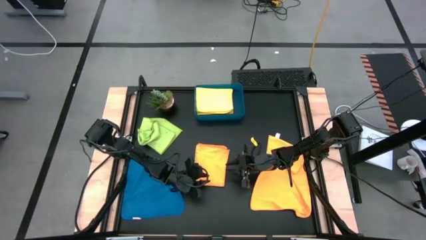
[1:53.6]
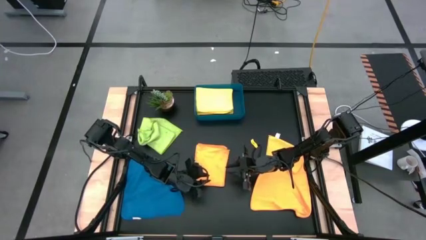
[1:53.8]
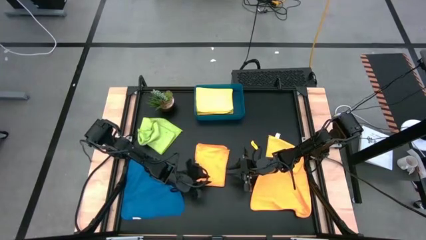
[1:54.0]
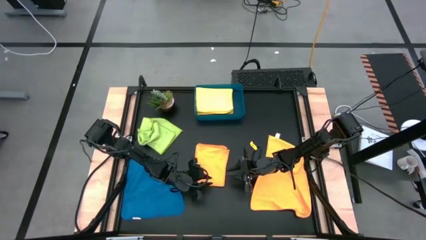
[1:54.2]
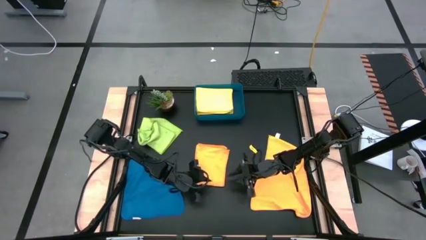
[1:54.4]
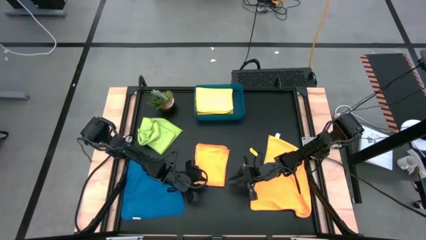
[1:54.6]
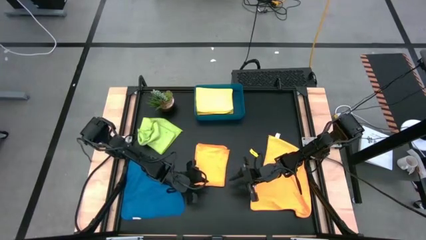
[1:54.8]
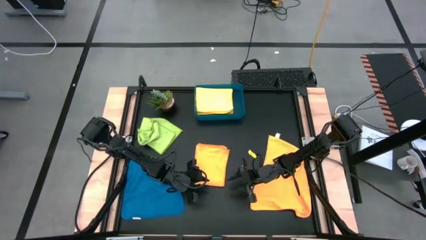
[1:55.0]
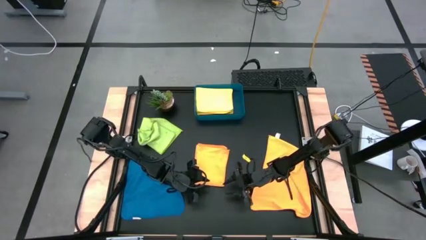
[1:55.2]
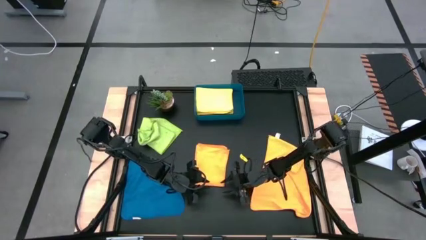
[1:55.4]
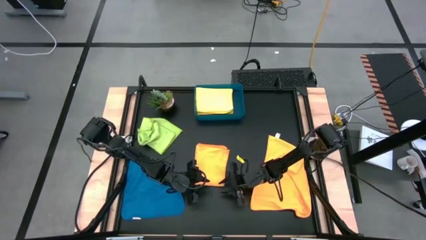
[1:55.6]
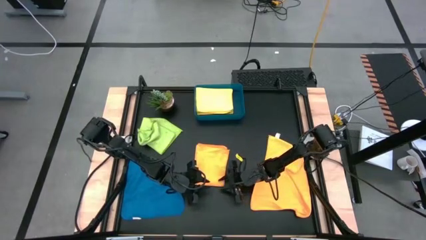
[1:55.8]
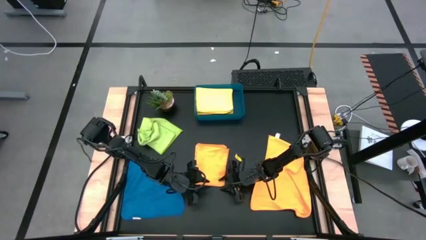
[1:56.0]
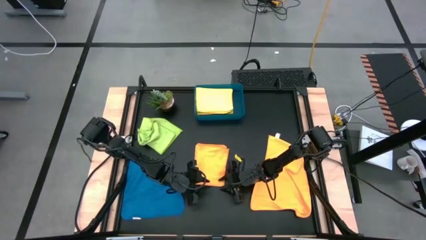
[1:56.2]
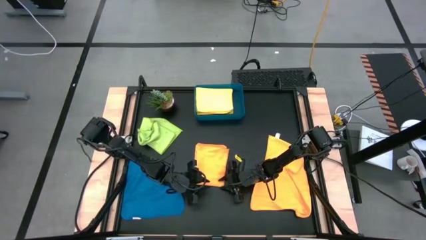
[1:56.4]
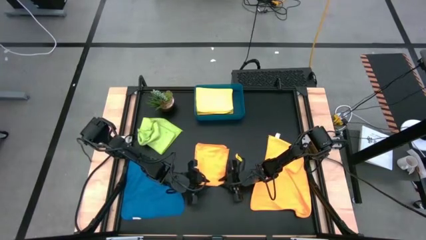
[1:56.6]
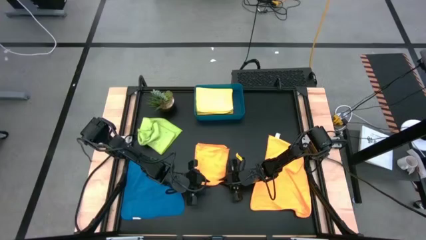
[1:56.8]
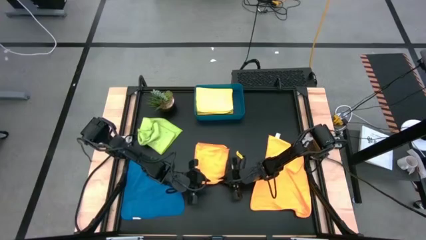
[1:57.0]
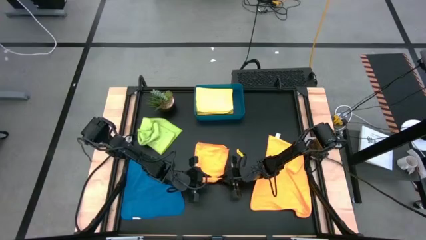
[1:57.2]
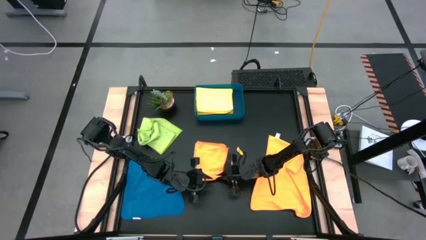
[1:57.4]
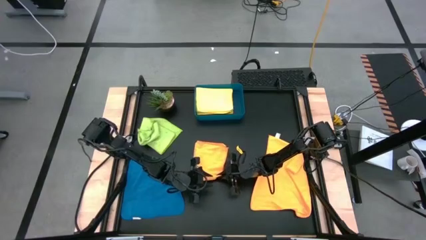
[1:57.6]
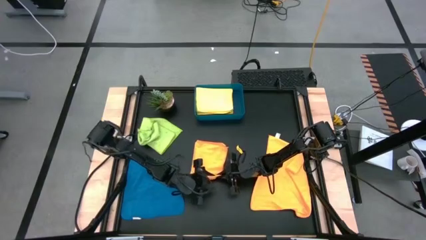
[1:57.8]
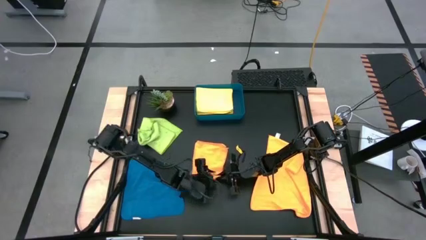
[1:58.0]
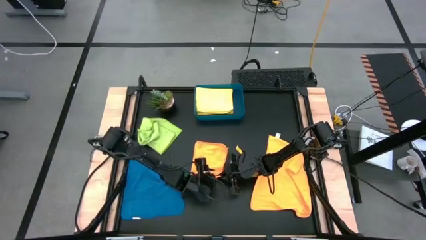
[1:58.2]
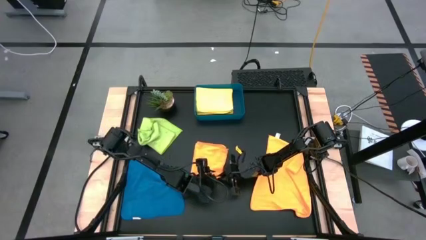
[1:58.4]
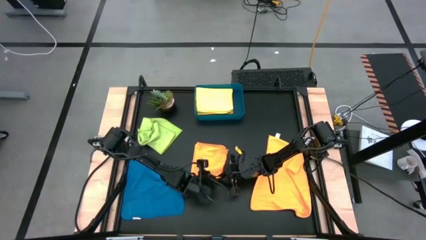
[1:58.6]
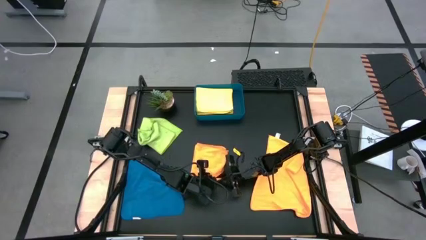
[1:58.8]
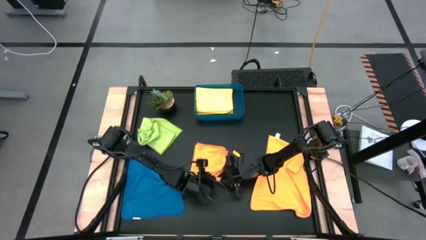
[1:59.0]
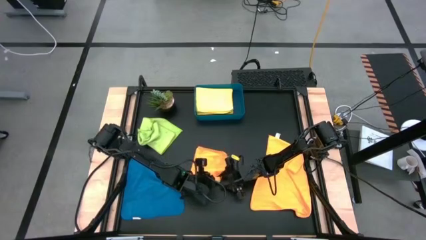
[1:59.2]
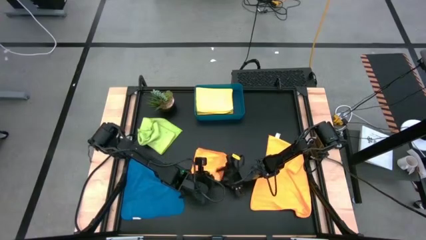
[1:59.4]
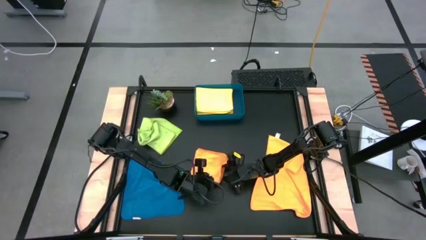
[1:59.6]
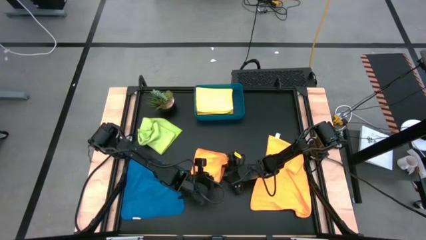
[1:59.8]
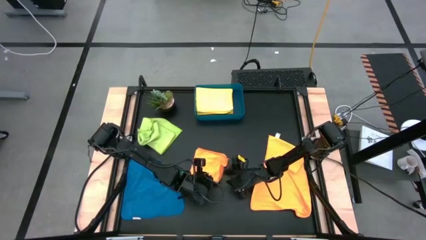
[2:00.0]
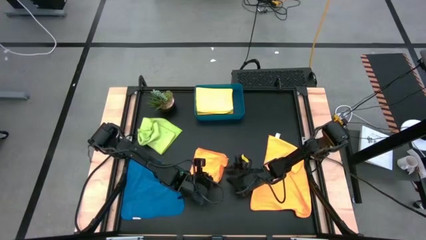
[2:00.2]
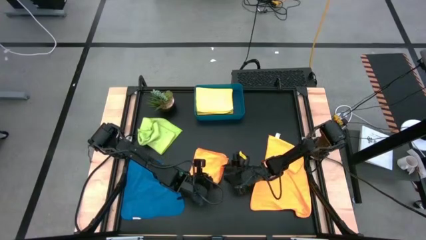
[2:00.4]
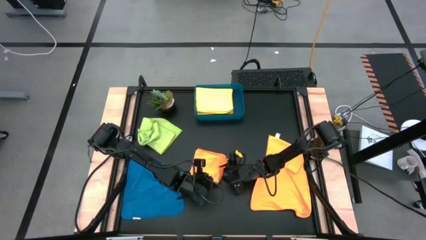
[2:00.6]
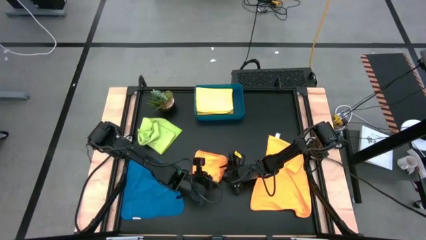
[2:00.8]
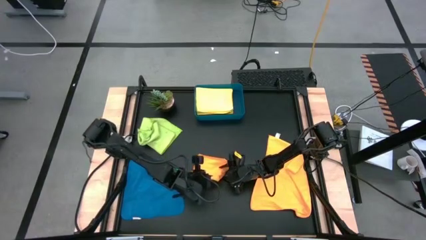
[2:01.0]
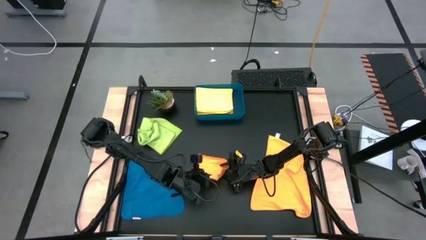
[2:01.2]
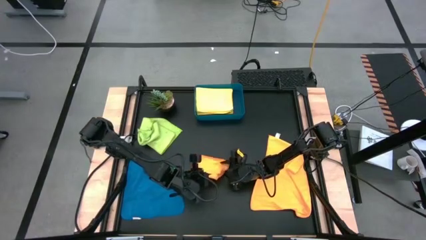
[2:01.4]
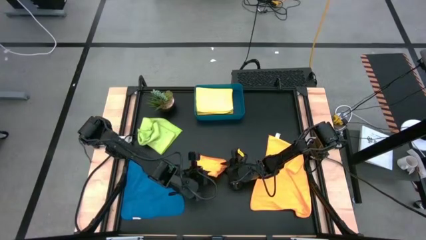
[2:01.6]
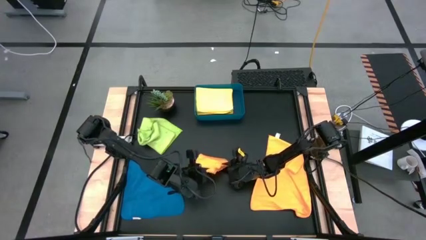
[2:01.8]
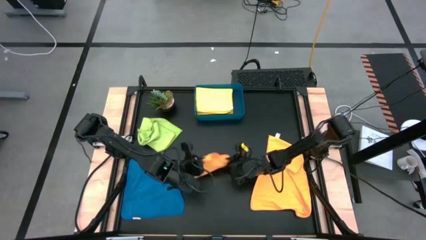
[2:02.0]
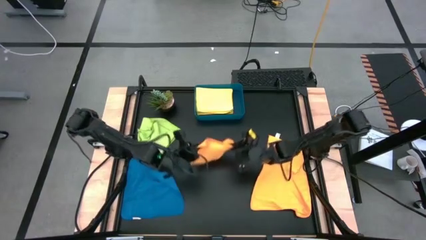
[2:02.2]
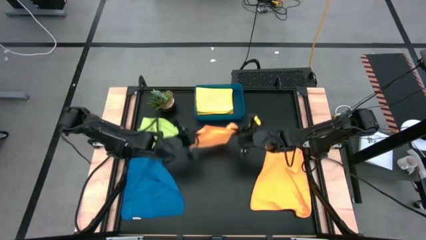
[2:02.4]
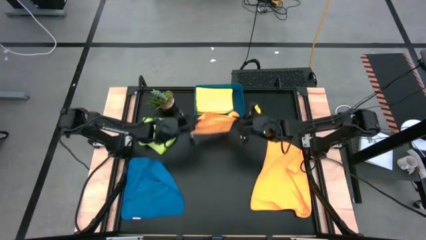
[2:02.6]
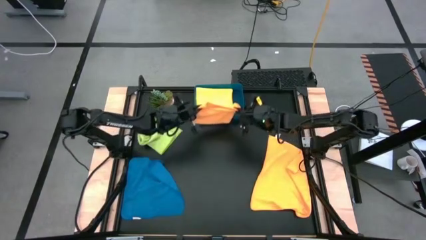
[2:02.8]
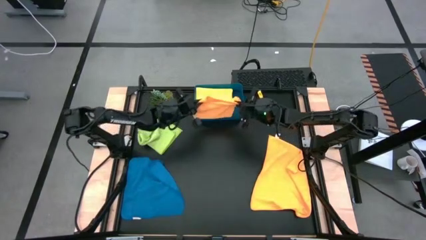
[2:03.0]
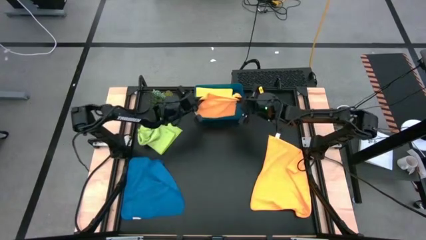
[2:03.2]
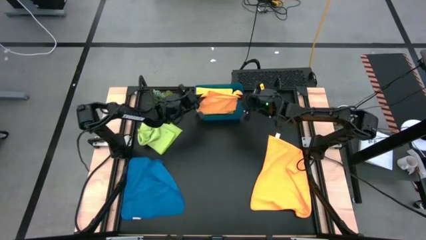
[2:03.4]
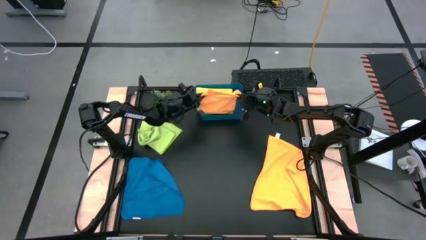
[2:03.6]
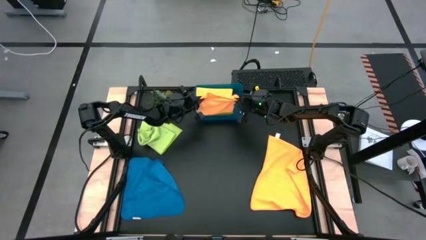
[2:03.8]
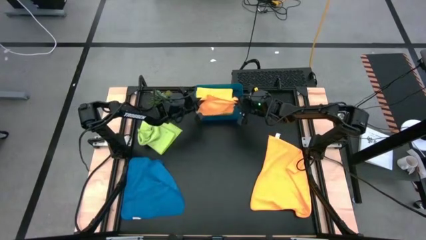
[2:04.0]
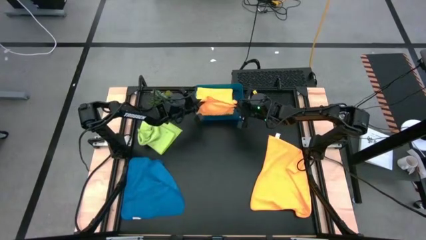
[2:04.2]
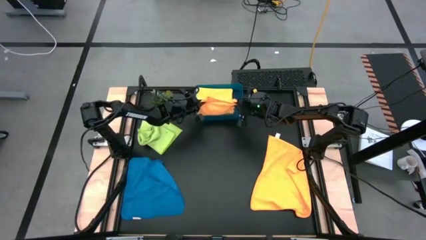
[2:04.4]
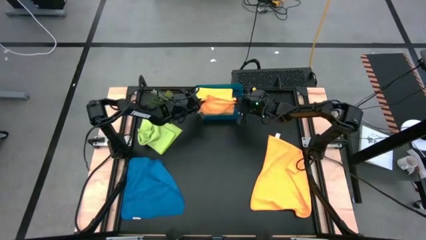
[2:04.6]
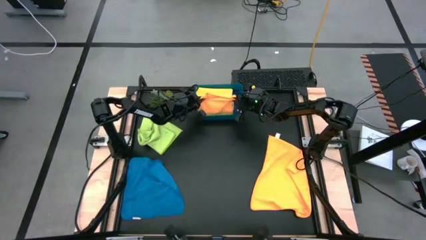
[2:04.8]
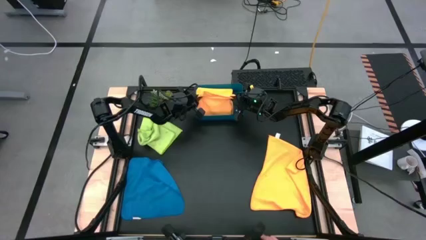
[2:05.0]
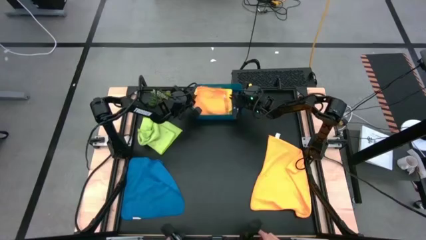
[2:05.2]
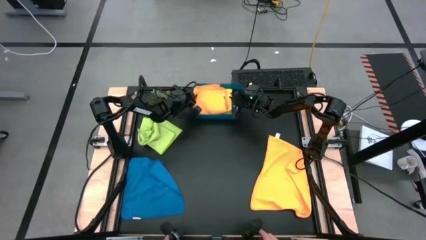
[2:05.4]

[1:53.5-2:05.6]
Task: Fold microfiber towels
Put the folded orange microfiber cloth into the blue bin

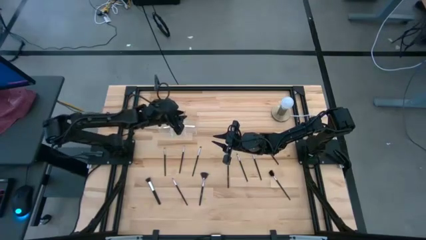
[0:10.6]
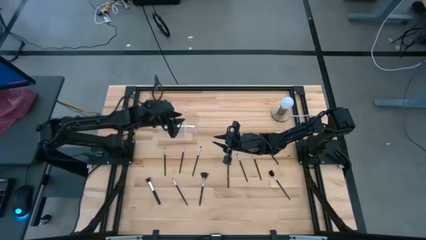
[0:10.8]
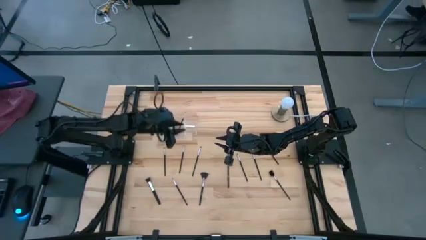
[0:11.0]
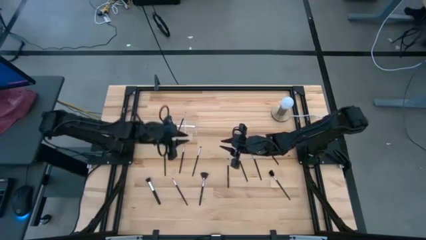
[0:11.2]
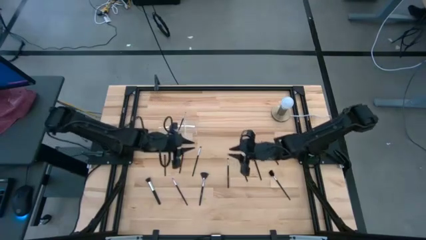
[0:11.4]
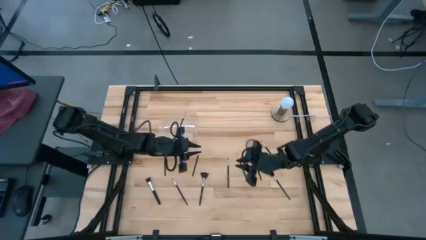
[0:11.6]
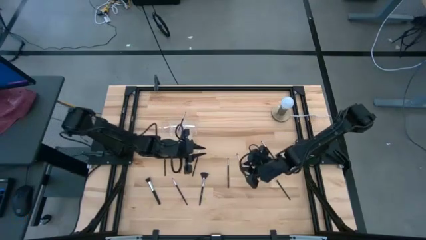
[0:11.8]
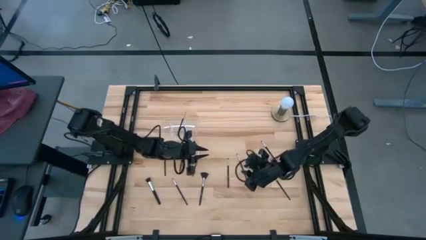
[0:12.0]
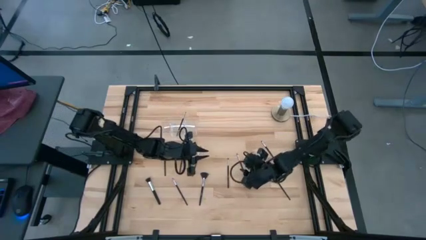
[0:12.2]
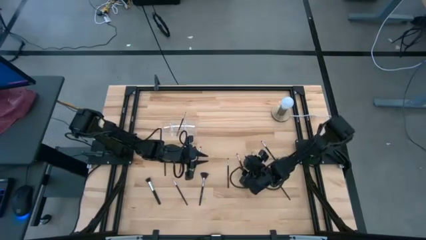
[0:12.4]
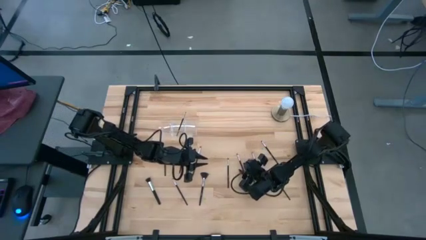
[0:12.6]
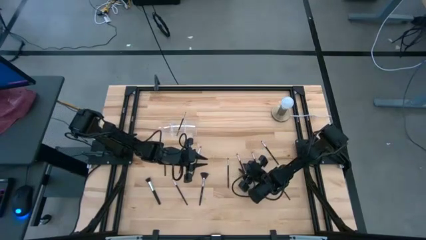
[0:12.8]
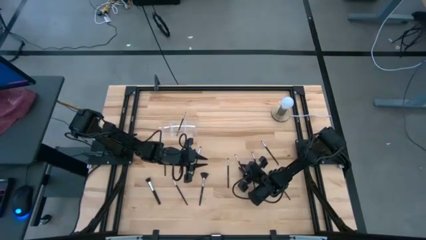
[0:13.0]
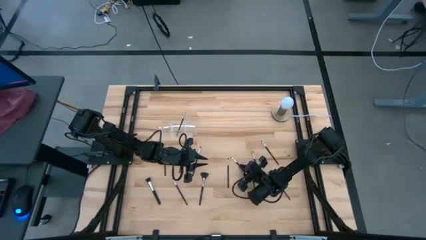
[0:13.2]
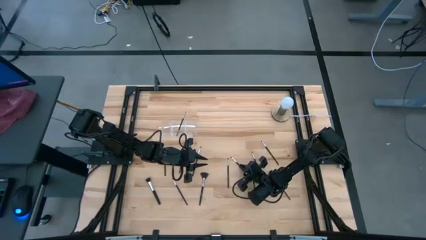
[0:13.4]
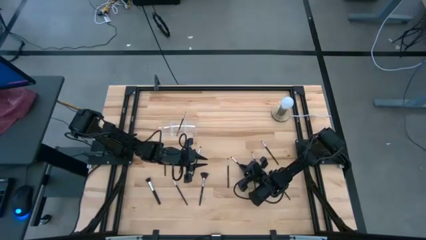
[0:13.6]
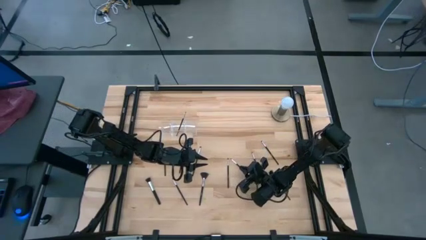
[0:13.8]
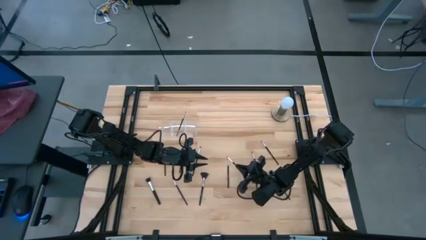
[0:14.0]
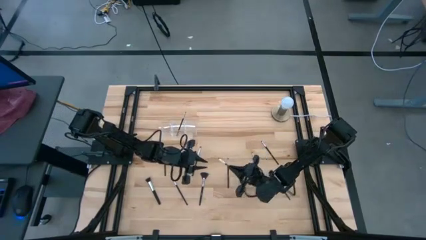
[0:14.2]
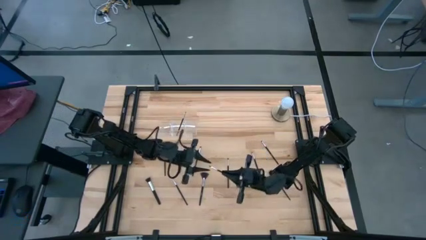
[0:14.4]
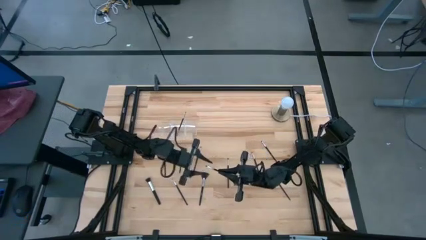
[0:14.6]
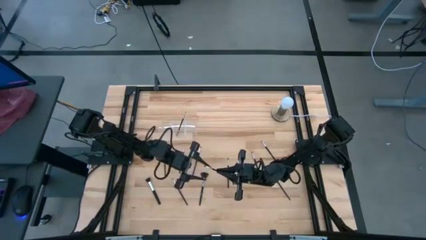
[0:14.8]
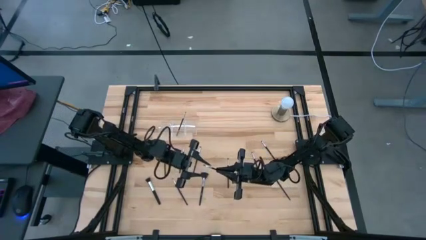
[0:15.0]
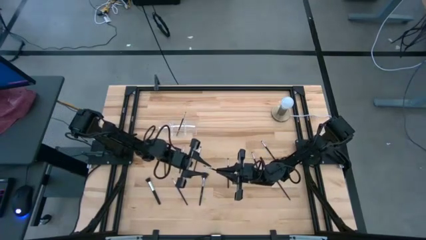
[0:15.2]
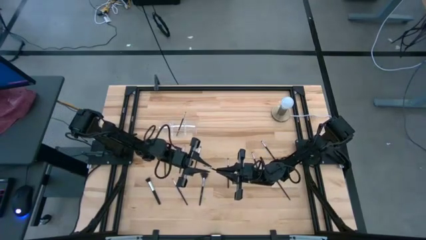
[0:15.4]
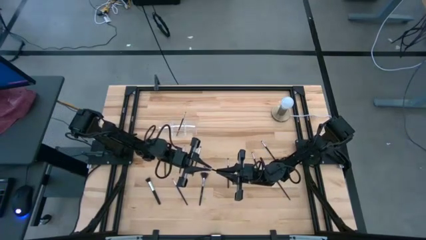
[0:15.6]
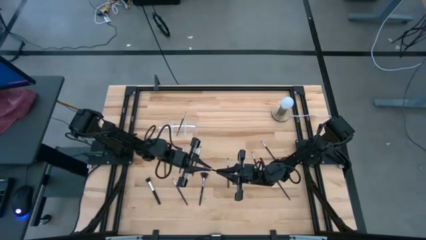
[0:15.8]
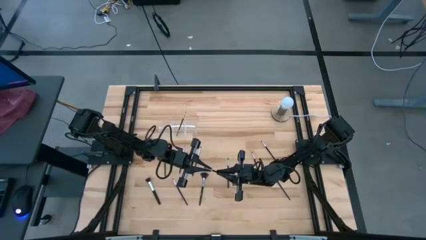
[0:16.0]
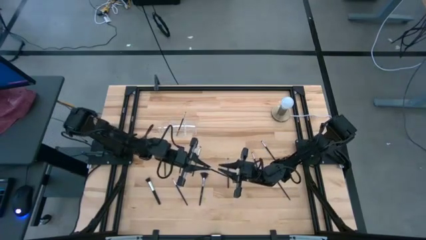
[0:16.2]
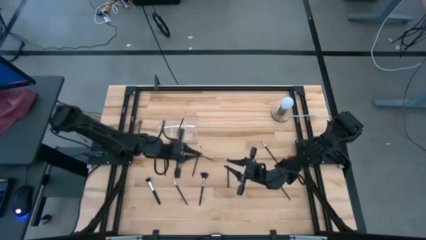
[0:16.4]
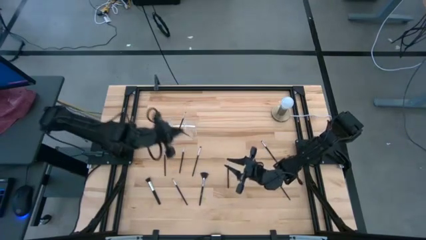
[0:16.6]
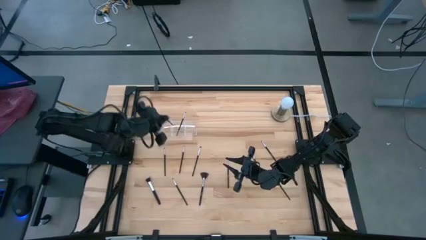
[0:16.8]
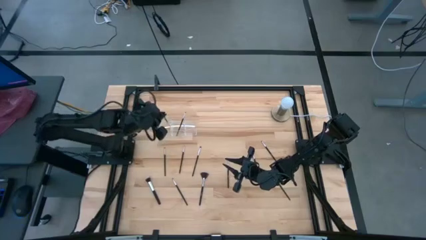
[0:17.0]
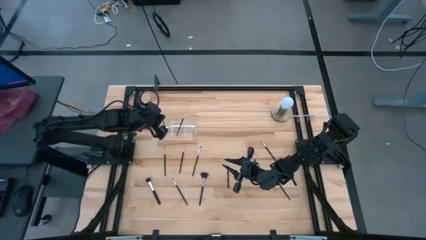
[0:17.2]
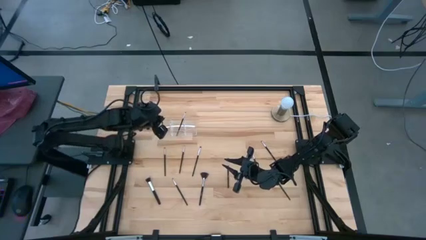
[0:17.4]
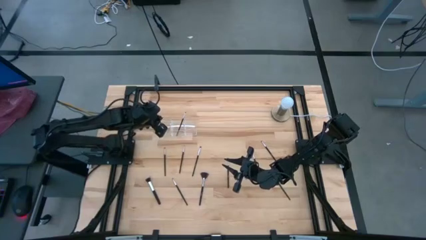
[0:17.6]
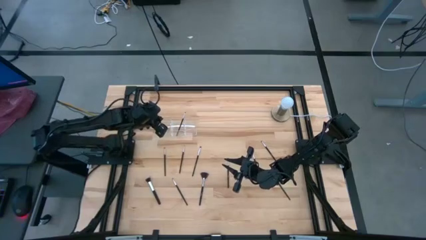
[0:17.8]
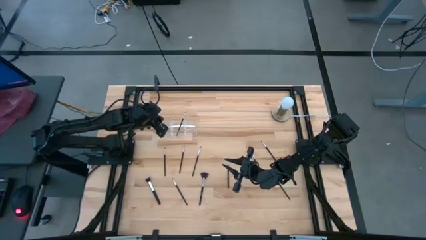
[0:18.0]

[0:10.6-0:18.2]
Task: Pick & Place Makeup Brushes
Put the black eyeshadow brush into the transparent organizer
